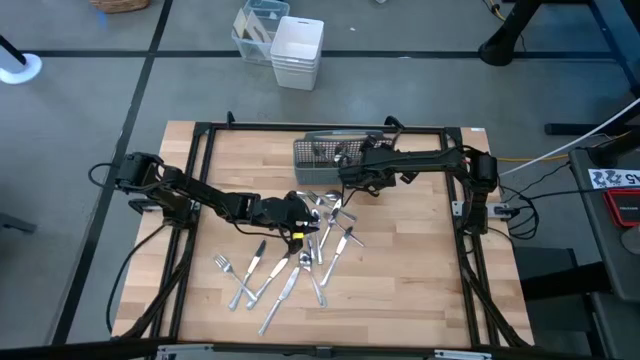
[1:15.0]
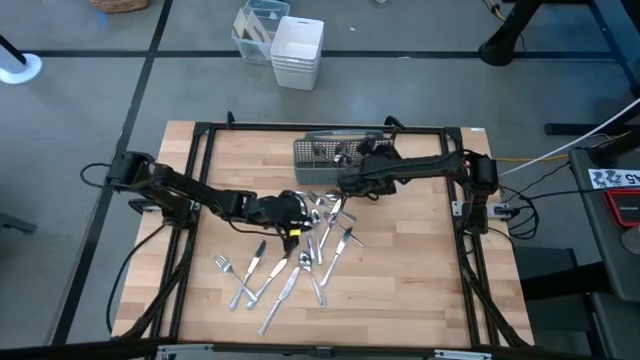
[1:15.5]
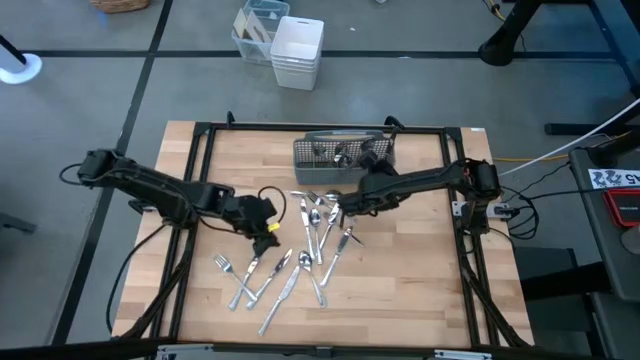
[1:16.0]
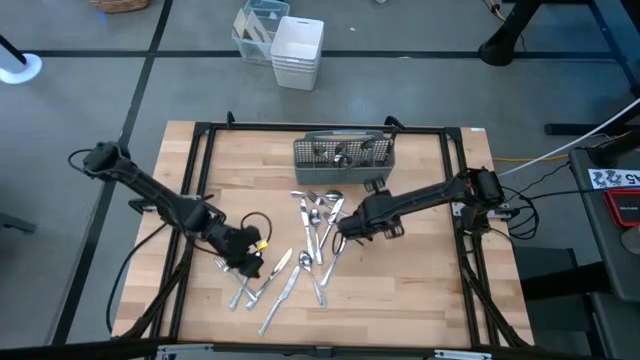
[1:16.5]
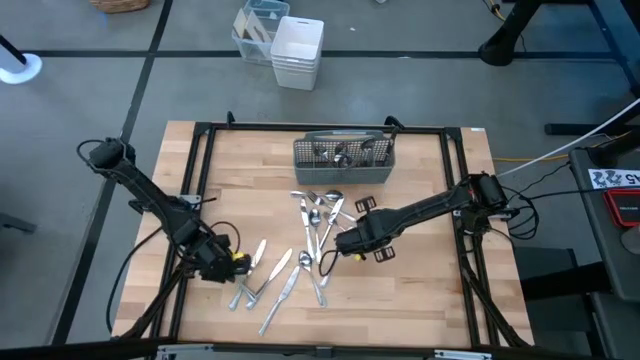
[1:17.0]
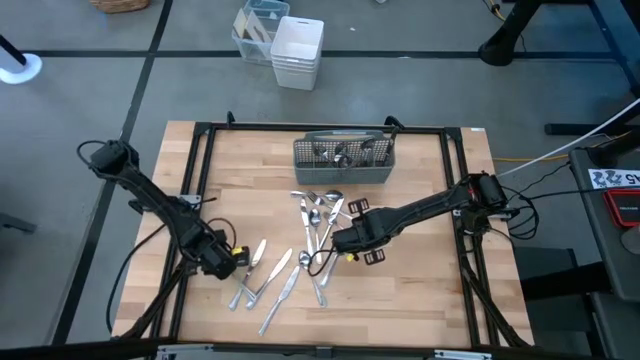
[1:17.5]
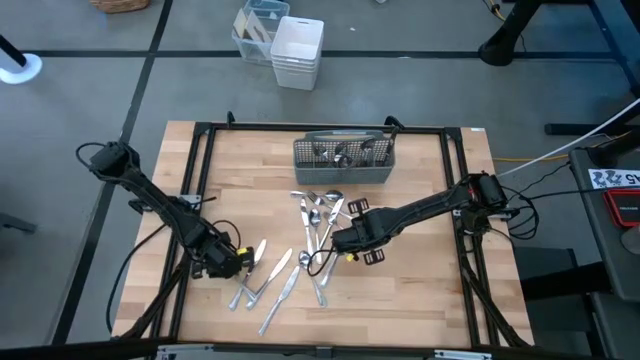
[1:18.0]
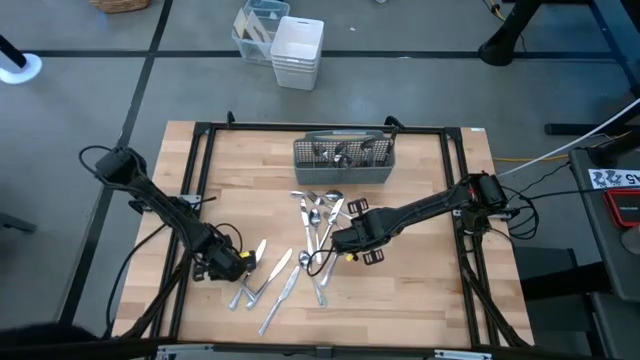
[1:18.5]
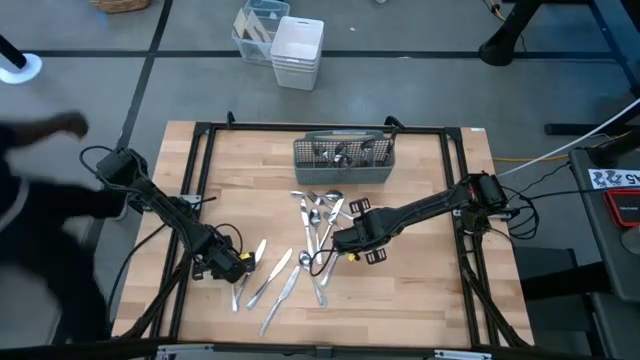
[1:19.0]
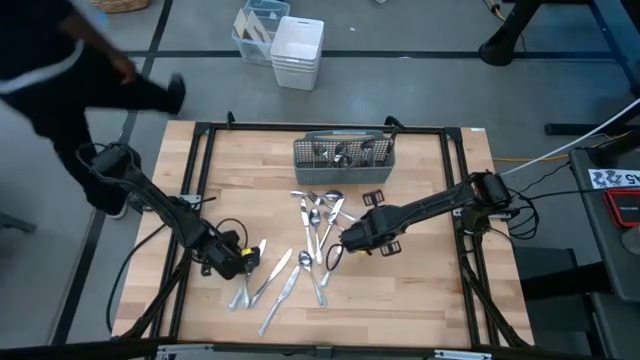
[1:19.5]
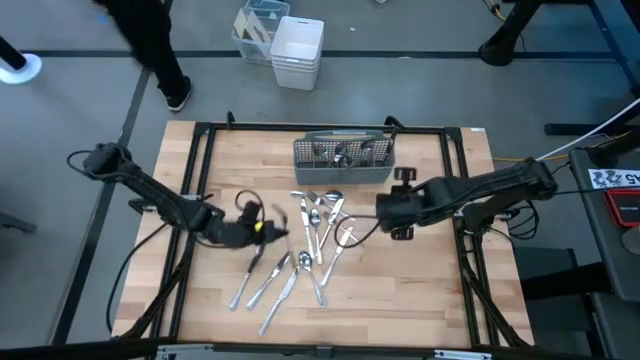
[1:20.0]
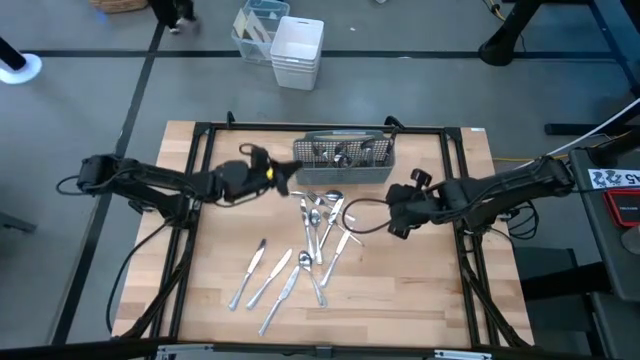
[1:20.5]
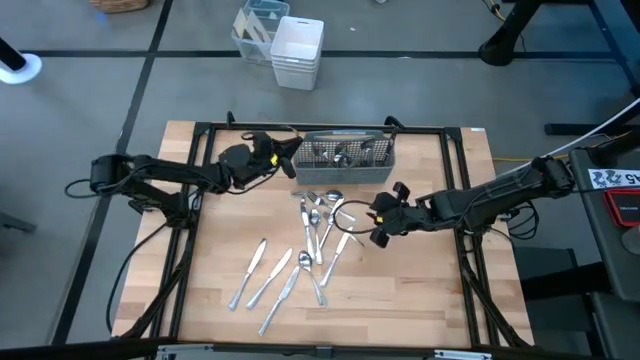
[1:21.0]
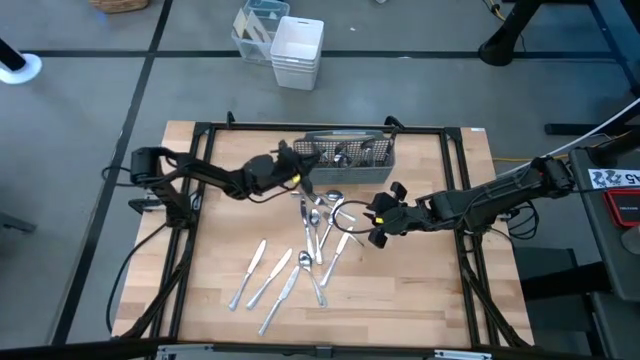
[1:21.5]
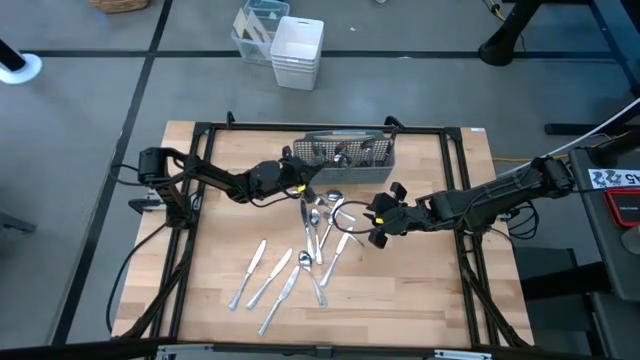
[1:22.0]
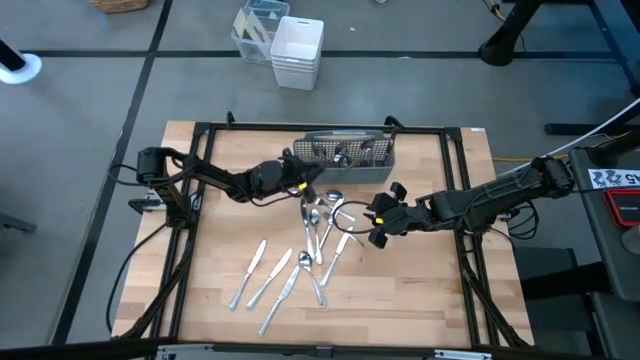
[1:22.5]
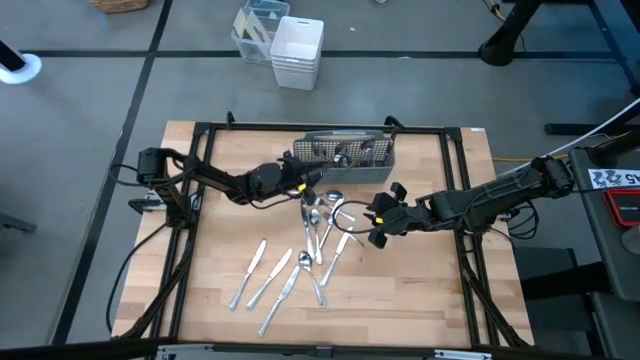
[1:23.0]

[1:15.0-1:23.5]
Task: Sort silverware
Put the fork into the silverware rack

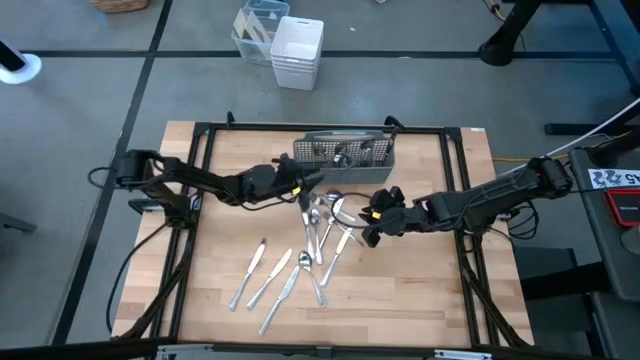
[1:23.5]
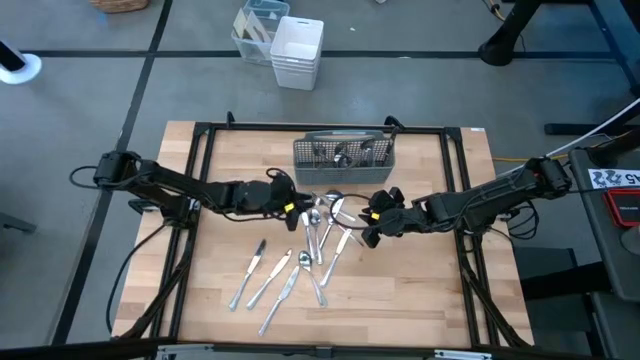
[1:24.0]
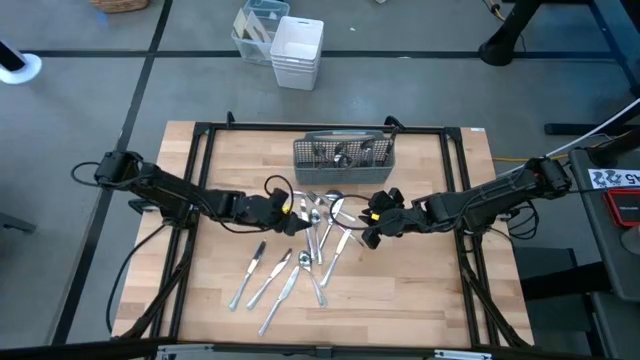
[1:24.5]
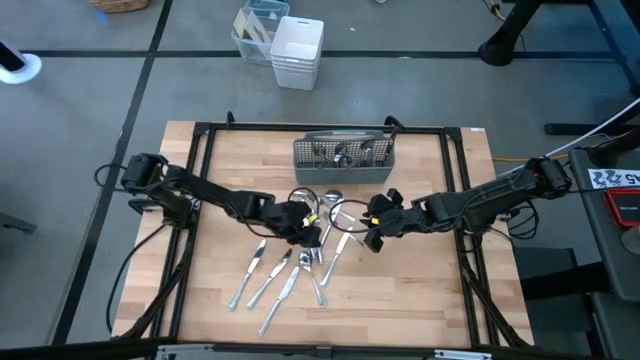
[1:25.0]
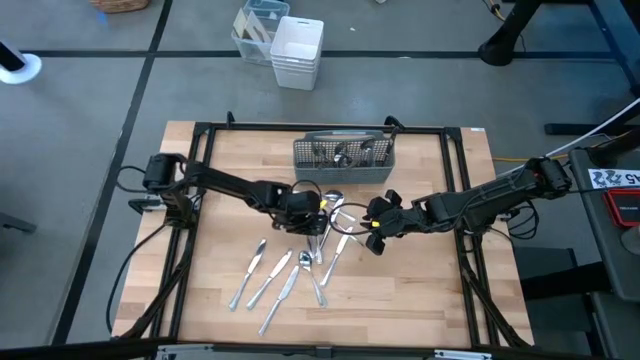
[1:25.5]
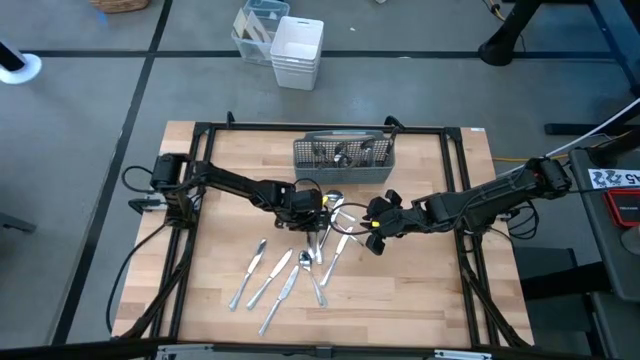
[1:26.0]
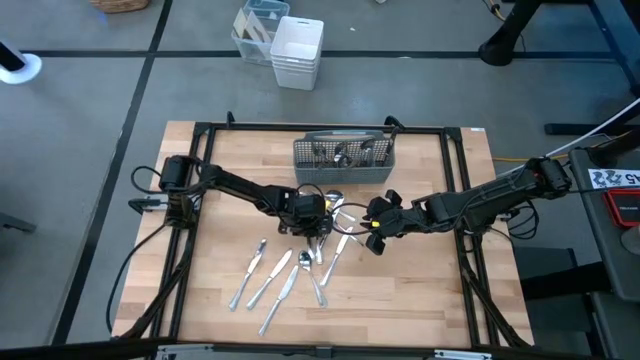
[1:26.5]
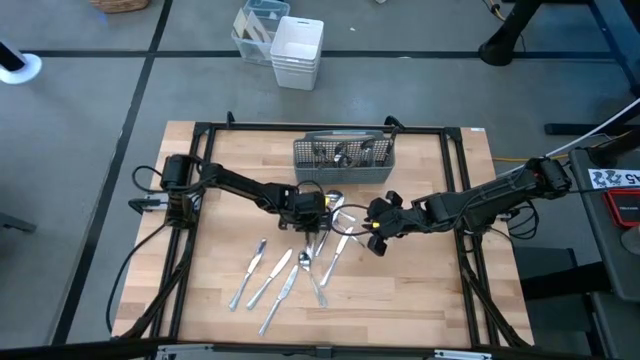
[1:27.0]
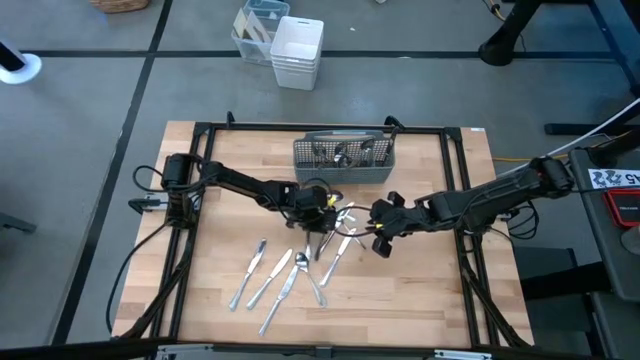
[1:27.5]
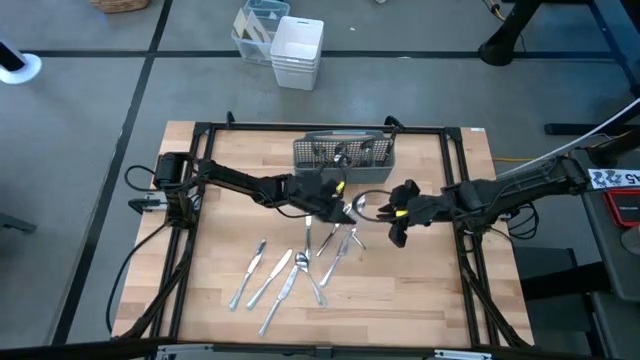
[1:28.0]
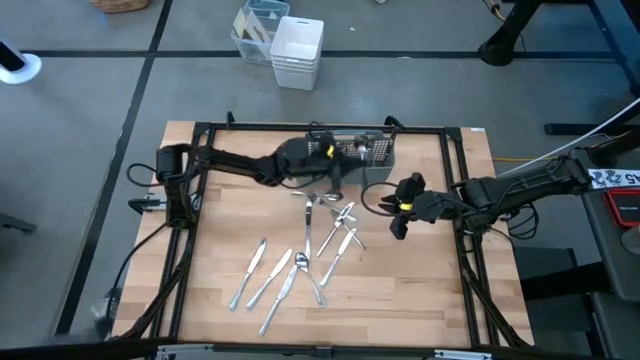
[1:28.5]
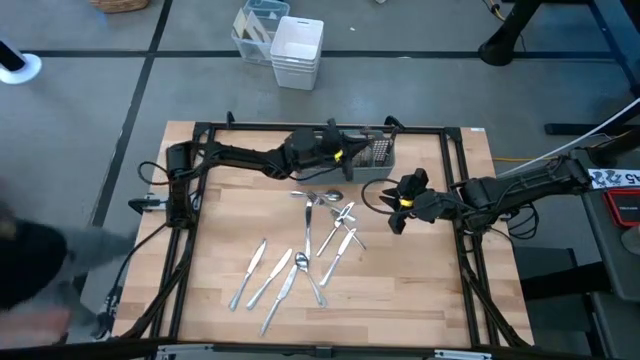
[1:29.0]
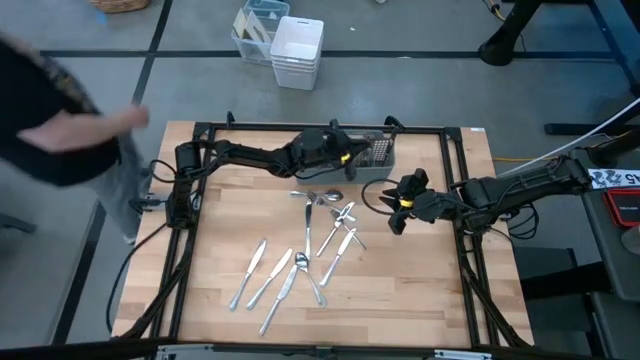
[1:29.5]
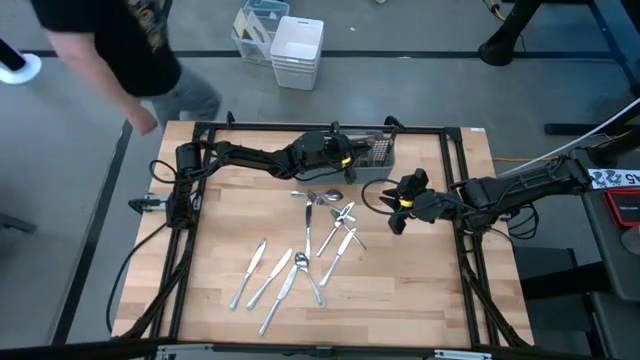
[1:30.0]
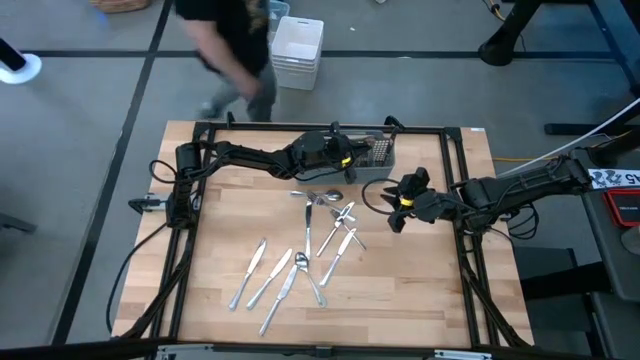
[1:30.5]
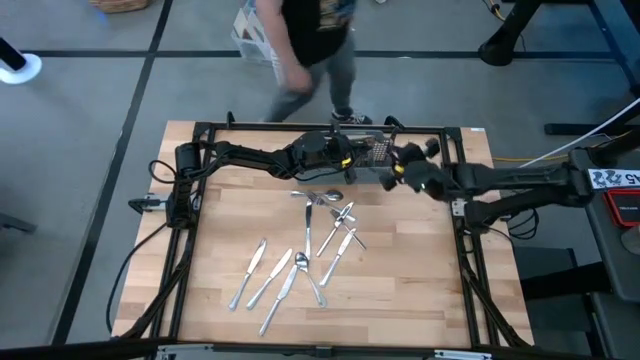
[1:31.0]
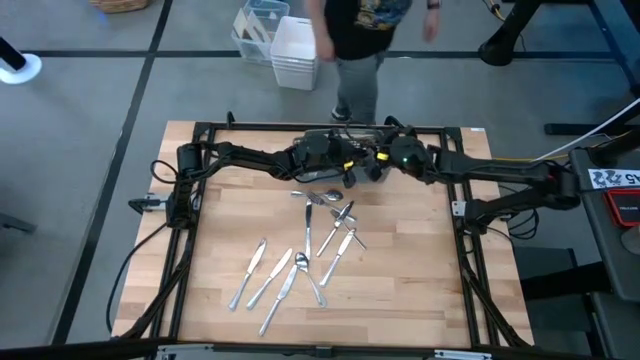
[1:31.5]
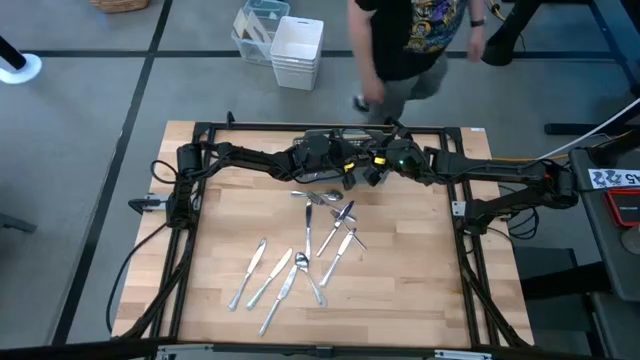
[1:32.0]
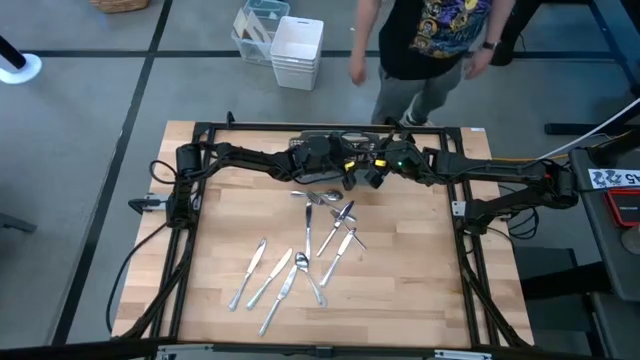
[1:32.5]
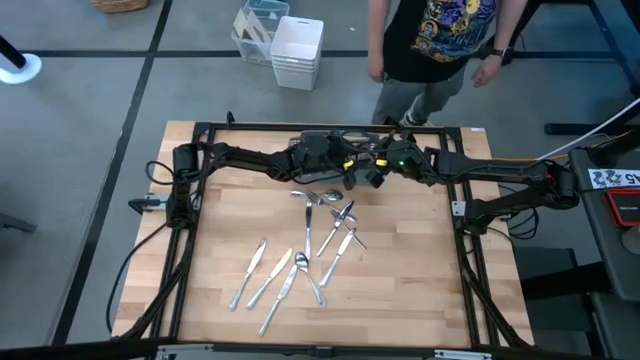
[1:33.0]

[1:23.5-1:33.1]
Put the spoon into the silverware rack

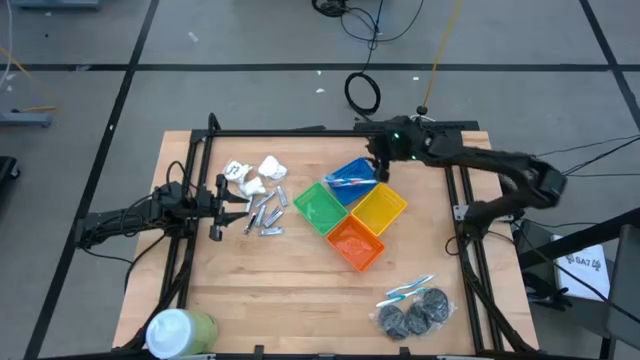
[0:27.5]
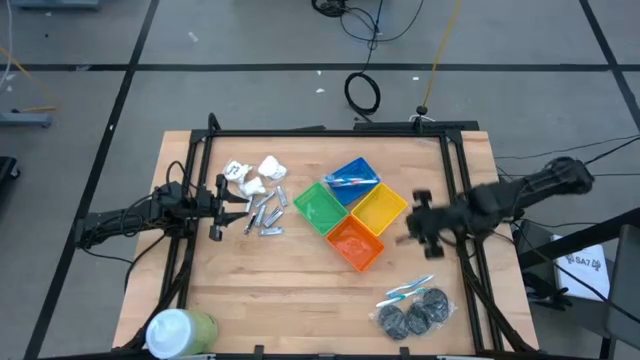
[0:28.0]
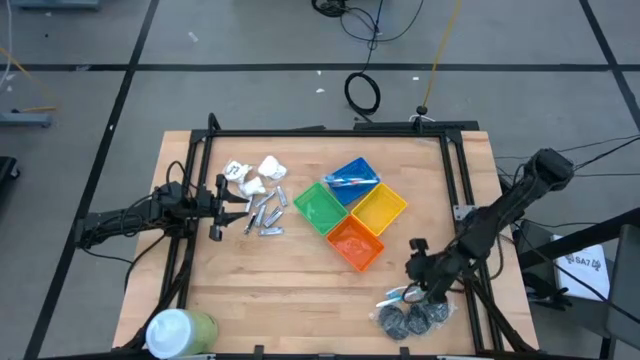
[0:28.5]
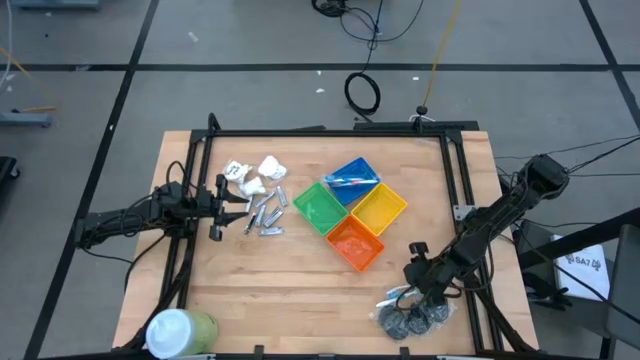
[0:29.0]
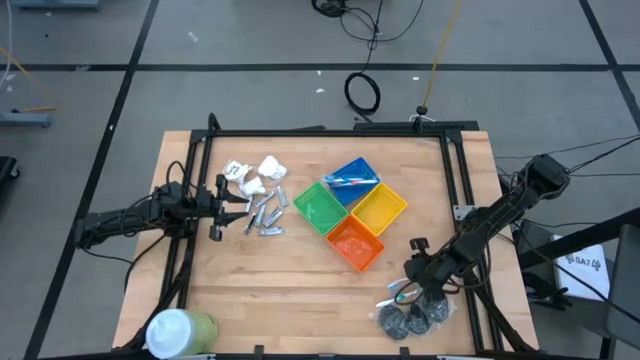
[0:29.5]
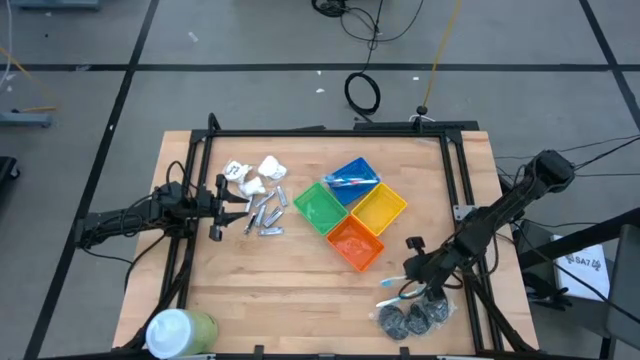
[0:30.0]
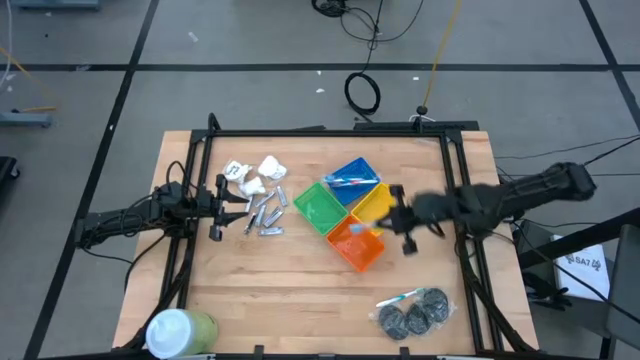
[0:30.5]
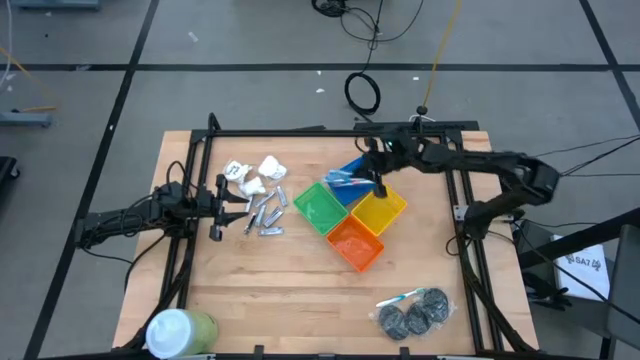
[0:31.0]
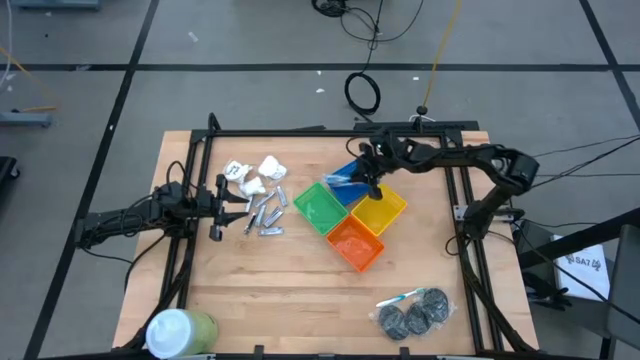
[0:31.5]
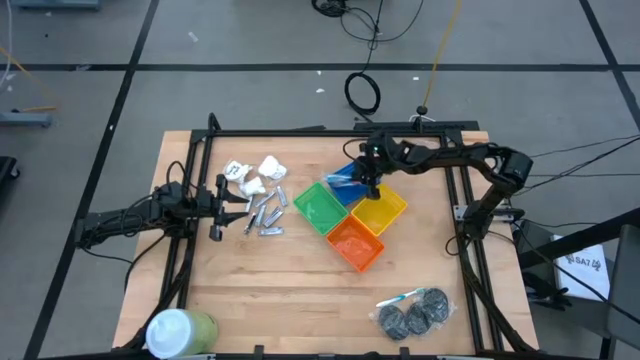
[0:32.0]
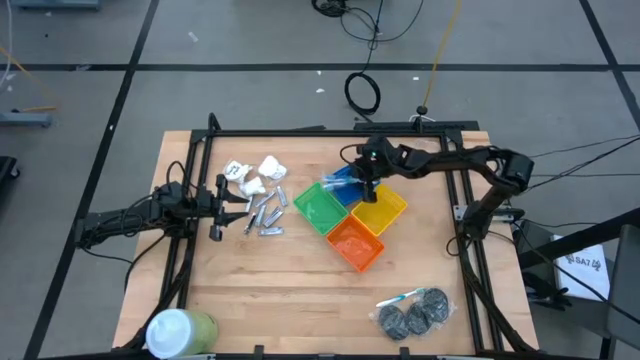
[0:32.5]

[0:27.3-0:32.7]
Task: Pick & Place Travel size toiletries
Put the blue toothbrush into the blue bin
